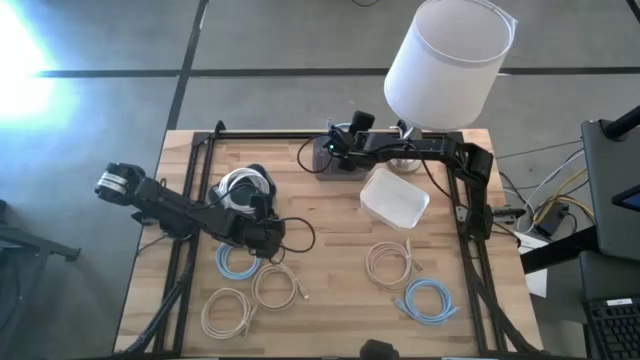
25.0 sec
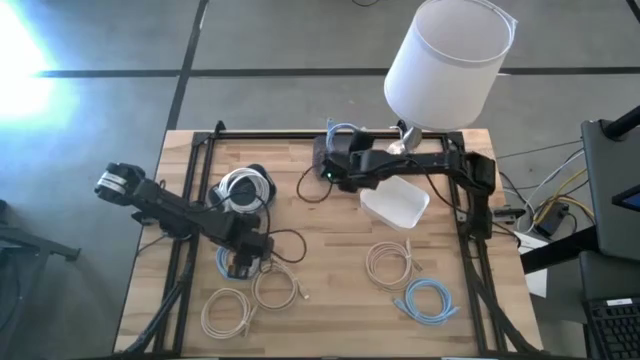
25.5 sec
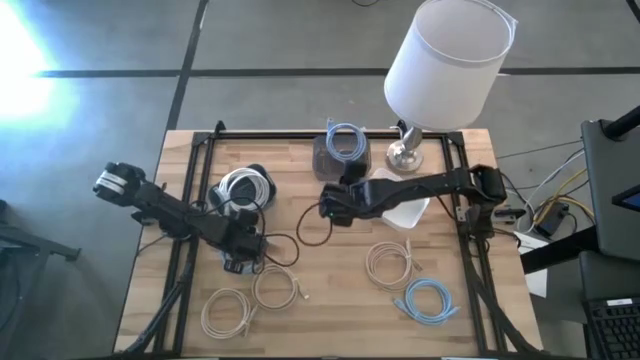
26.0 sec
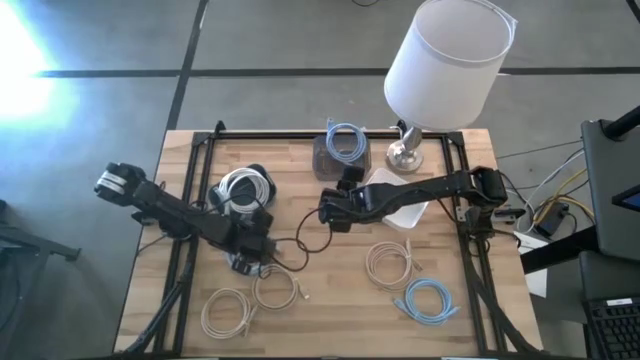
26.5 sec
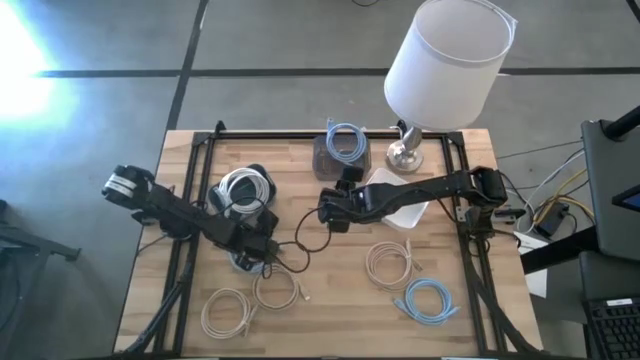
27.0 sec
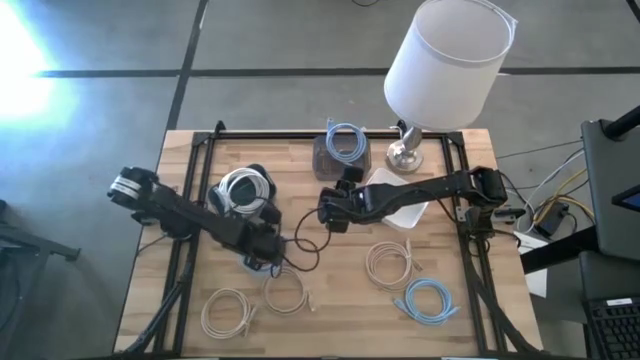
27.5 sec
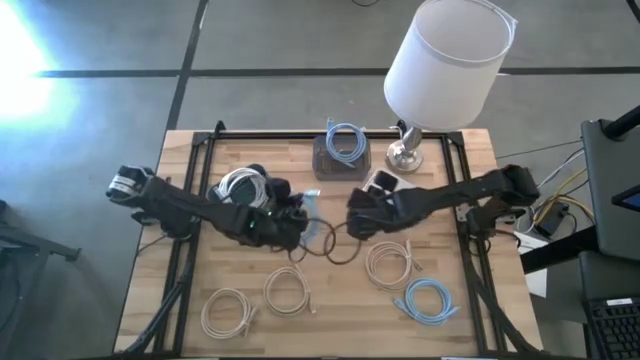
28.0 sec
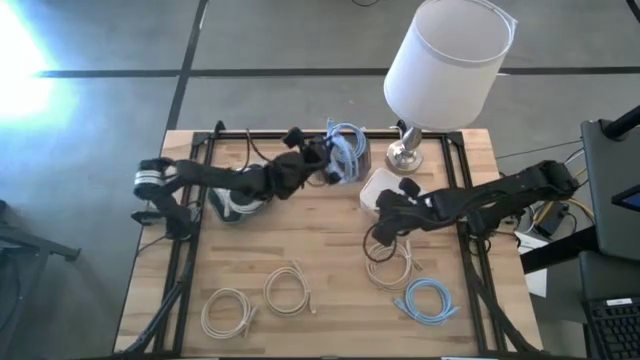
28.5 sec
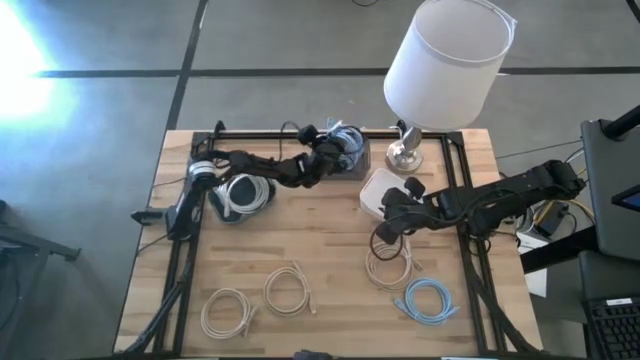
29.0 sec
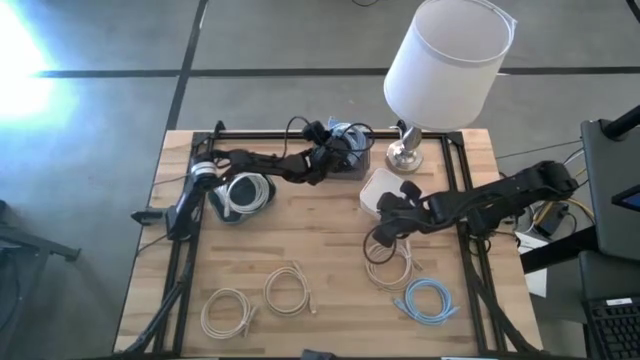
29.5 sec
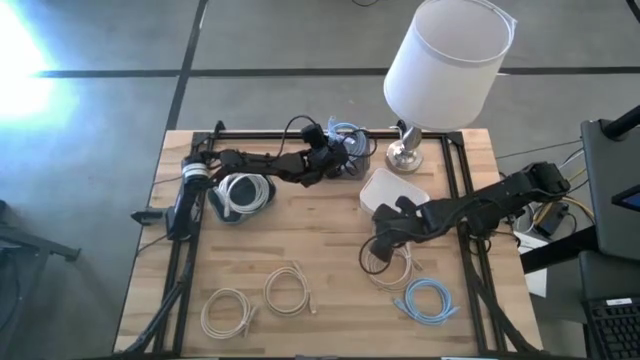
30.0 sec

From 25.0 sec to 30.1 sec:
Task: Sort HDMI cables
Put the left blue HDMI cable into the black bin

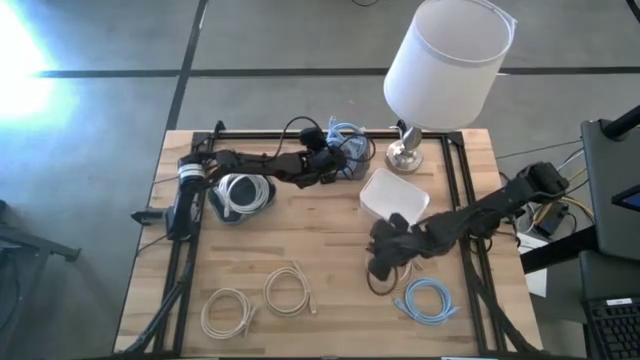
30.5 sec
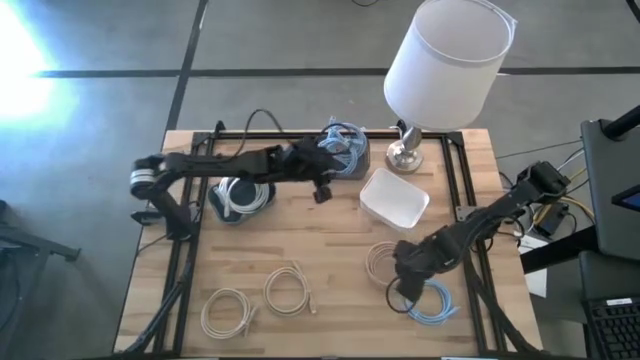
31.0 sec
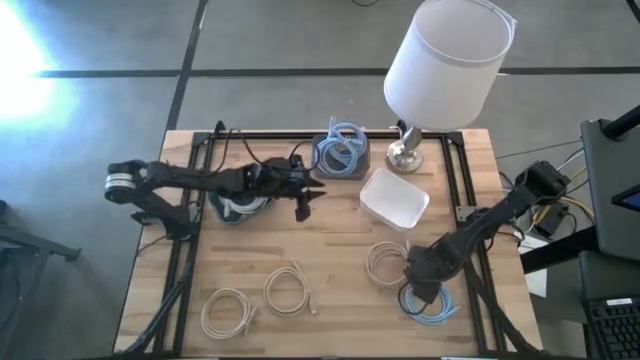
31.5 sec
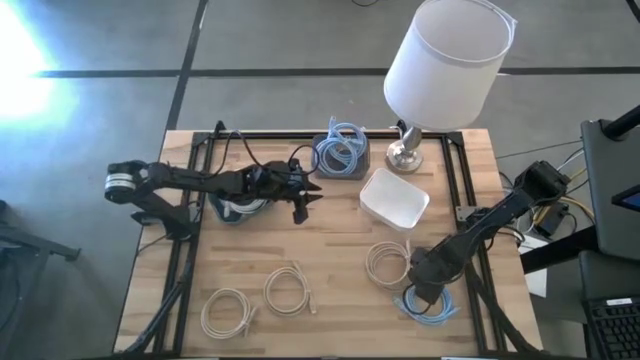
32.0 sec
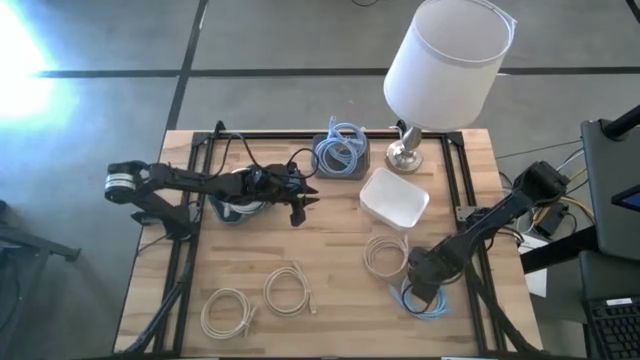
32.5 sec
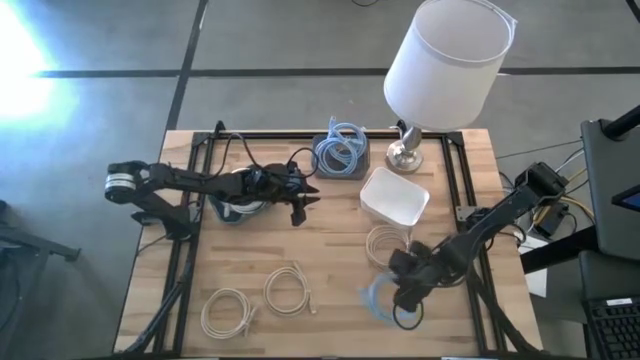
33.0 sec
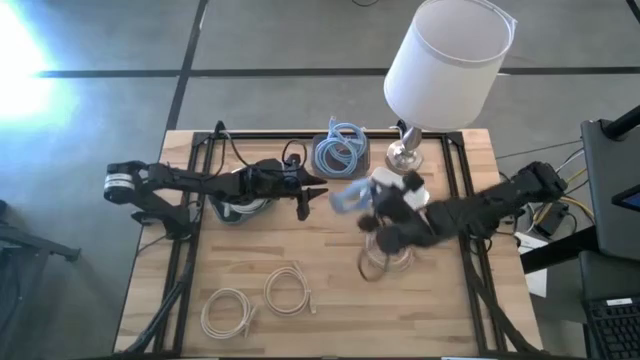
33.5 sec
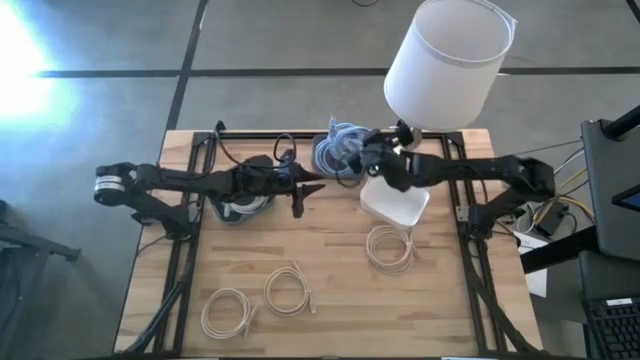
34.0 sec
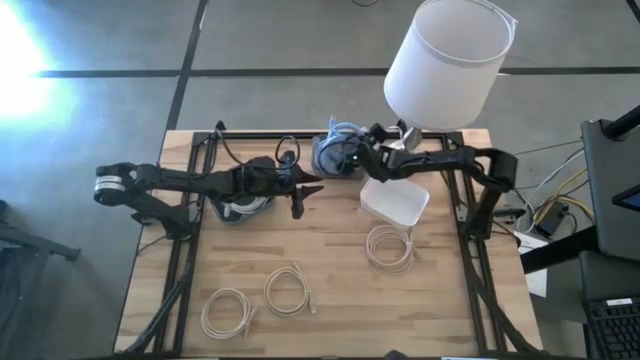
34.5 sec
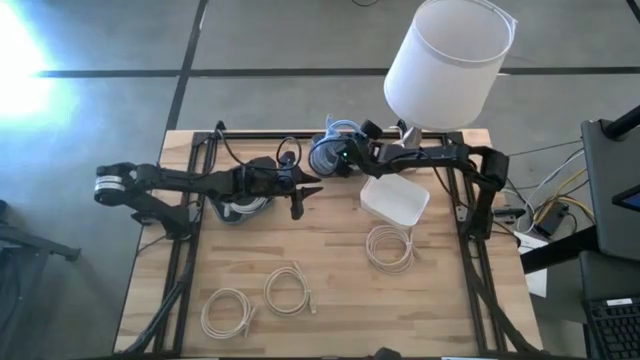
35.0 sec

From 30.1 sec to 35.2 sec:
Put the blue HDMI cable into the black bin

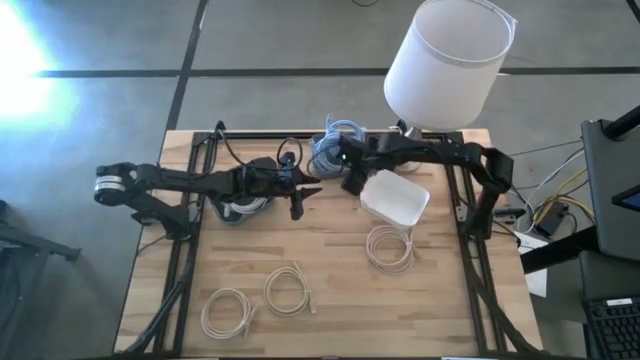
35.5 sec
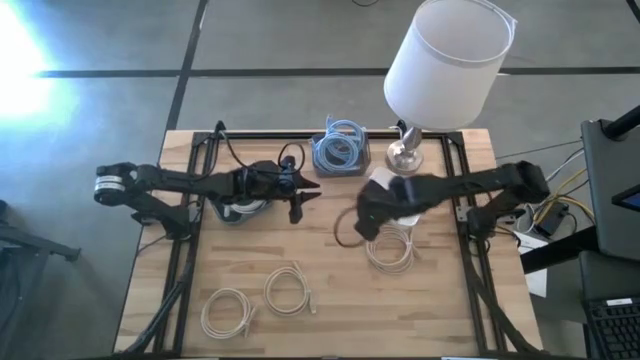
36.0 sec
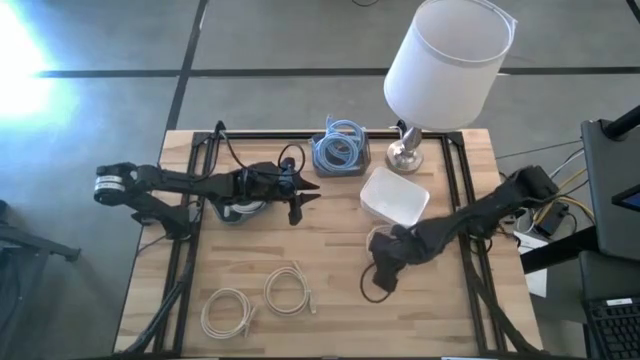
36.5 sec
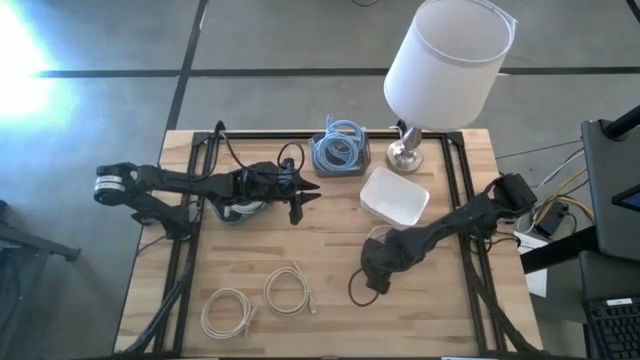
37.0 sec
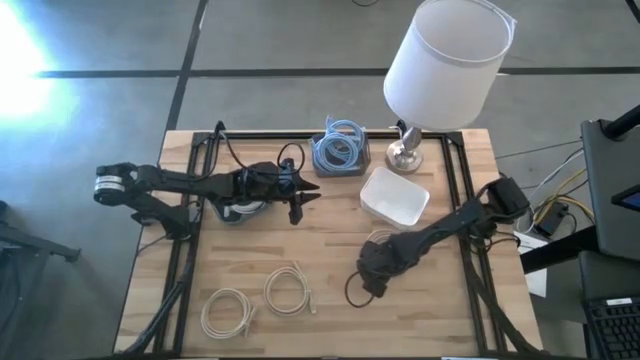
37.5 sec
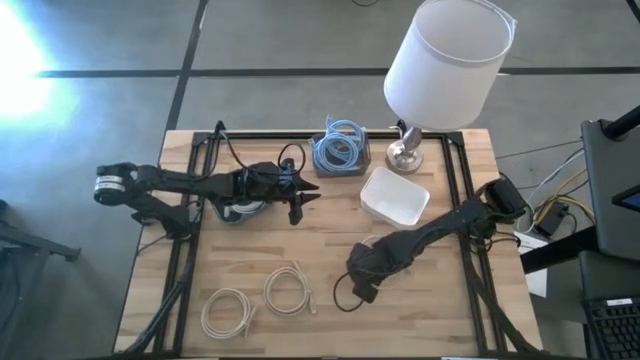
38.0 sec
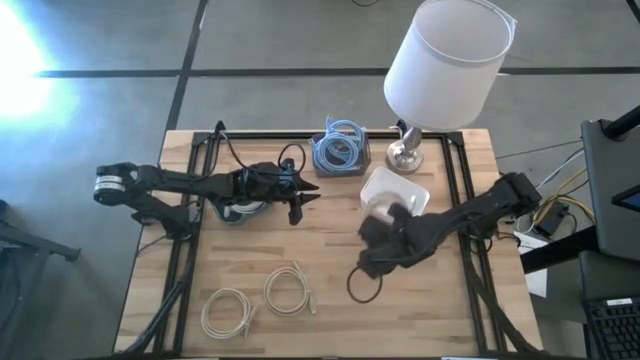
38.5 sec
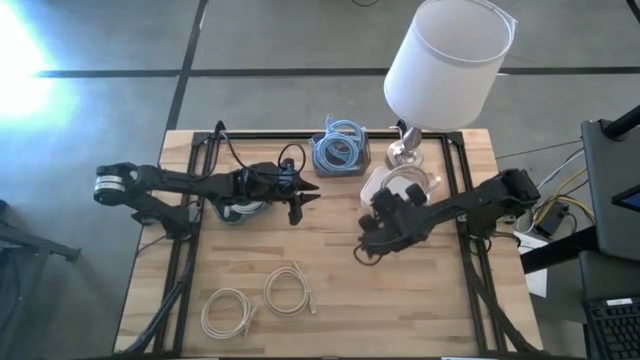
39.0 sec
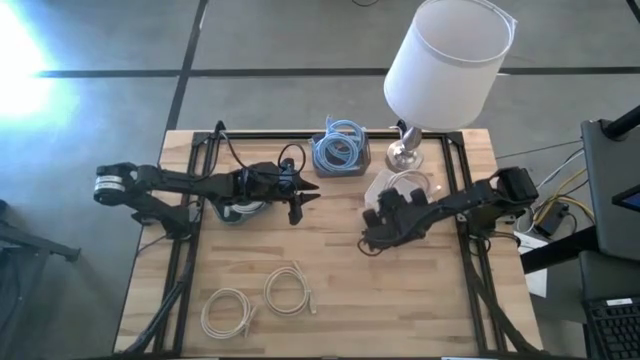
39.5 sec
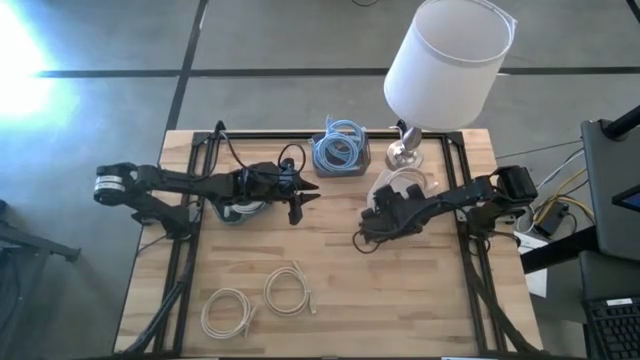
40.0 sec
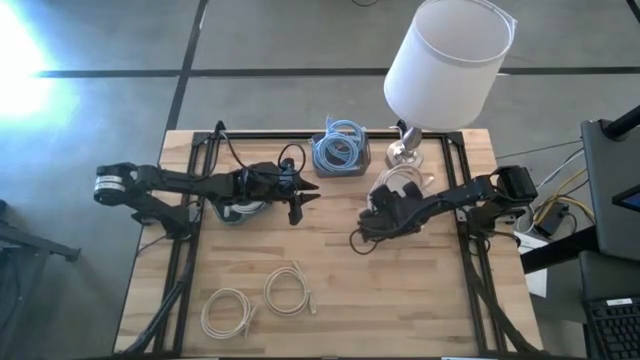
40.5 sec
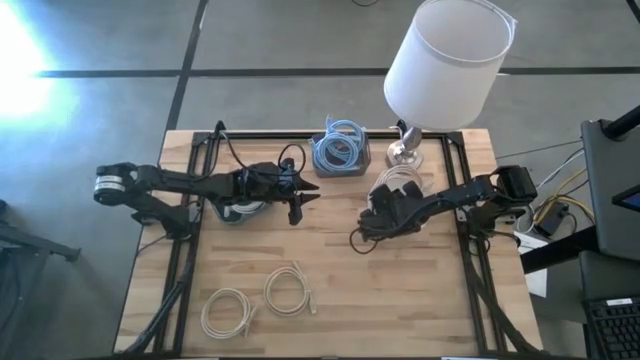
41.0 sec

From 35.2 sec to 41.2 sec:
Put the top right light brown HDMI cable into the white bin

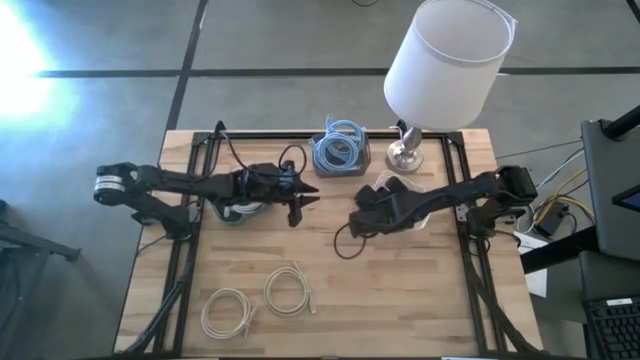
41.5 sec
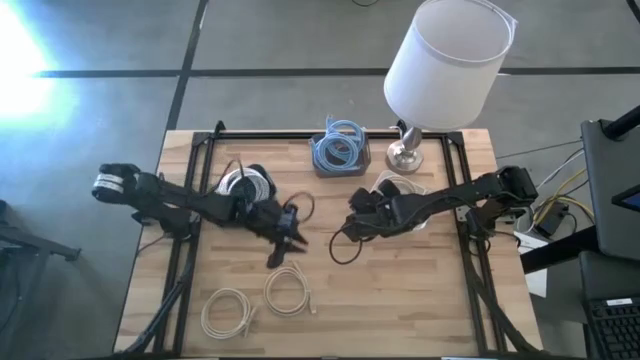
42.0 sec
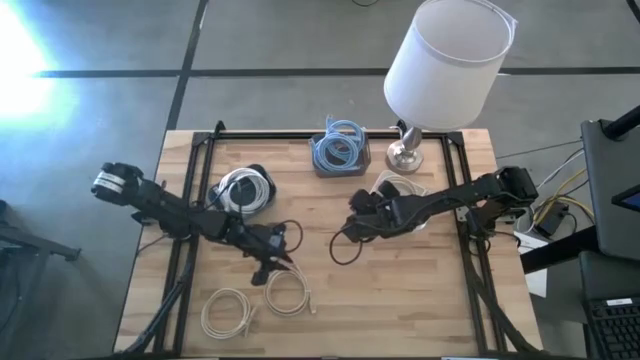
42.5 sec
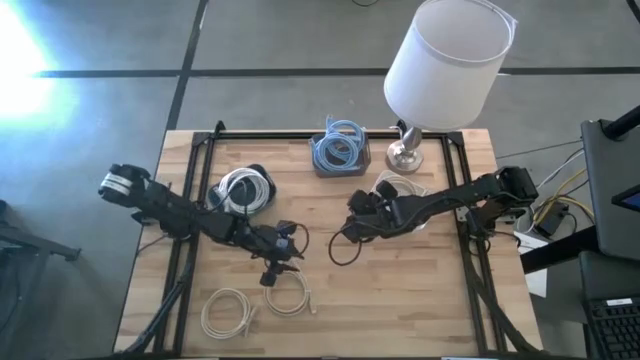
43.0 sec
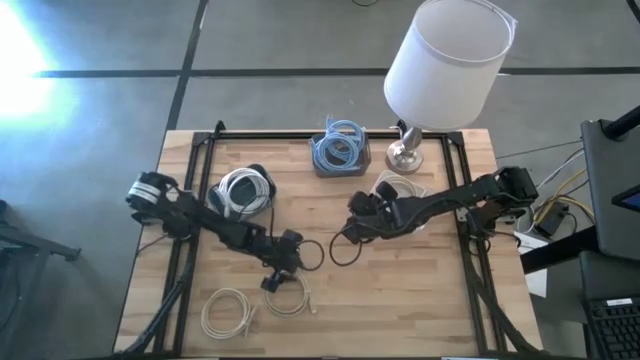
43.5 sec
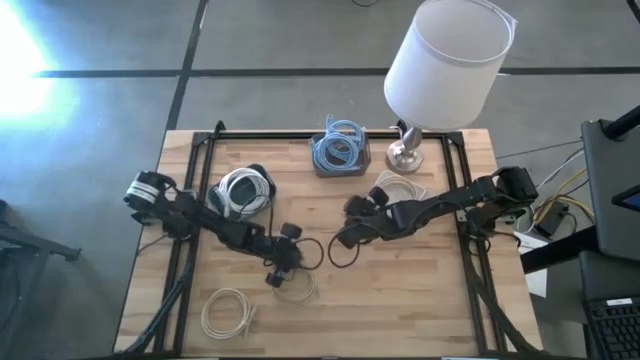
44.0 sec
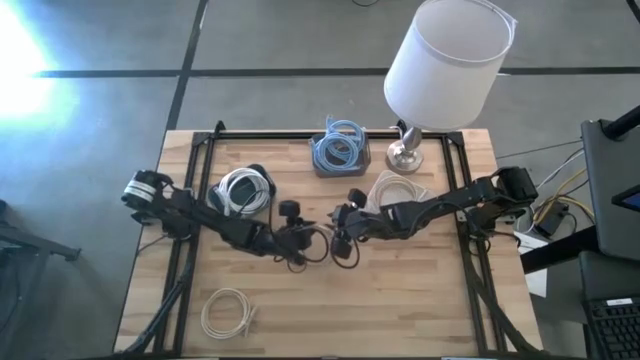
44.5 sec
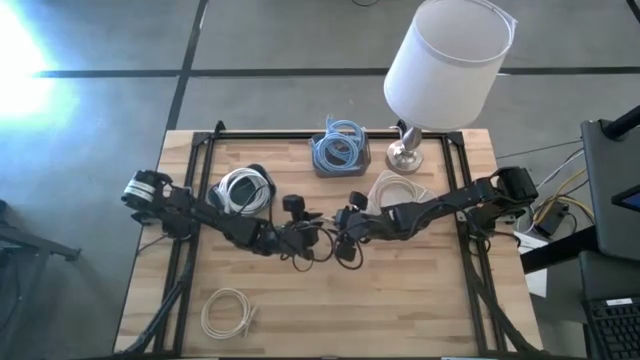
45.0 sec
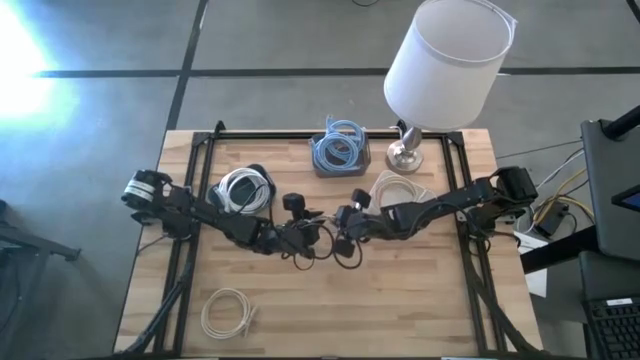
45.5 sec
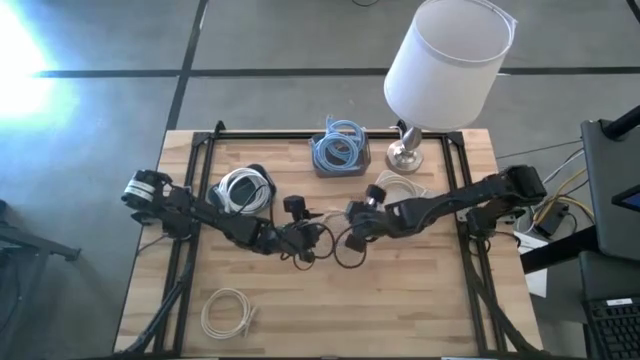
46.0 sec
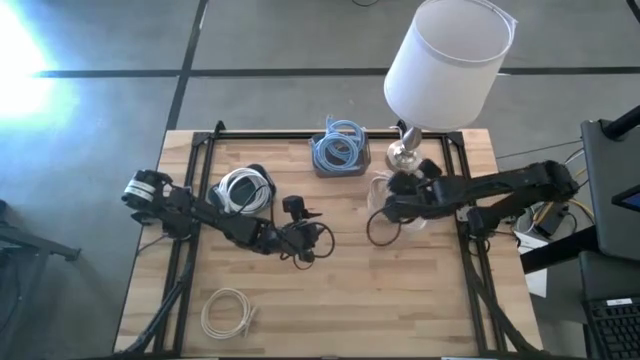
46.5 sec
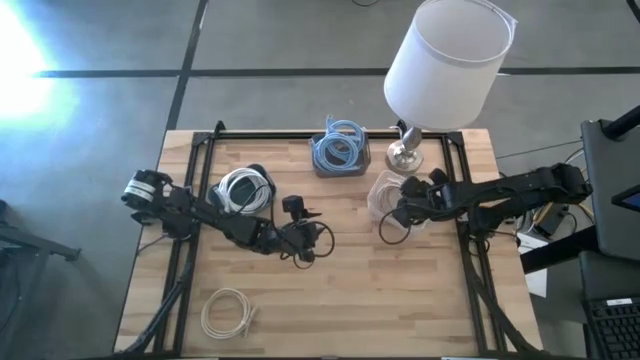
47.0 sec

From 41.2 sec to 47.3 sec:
Put the right light brown HDMI cable into the white bin
